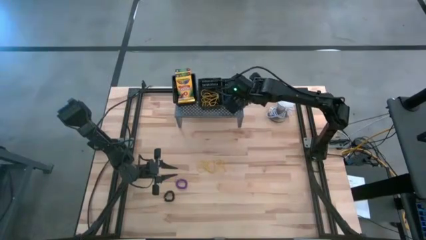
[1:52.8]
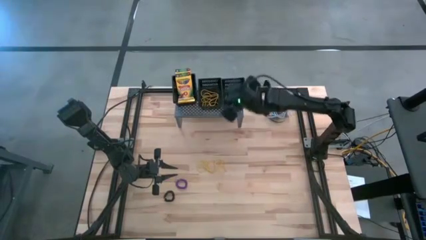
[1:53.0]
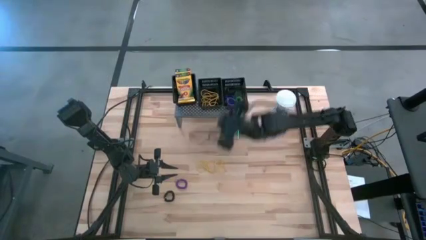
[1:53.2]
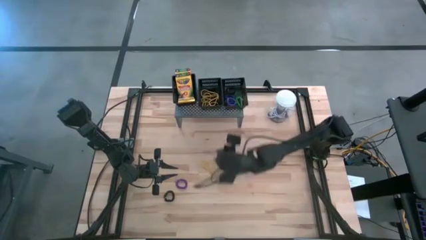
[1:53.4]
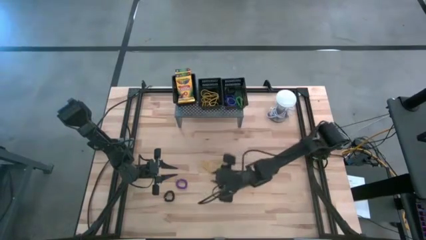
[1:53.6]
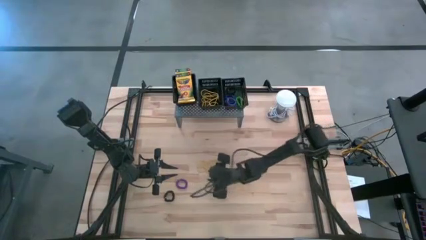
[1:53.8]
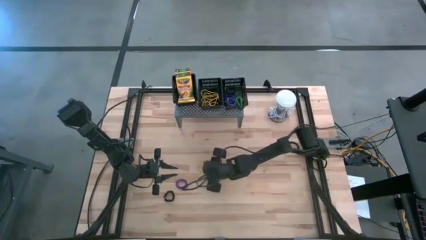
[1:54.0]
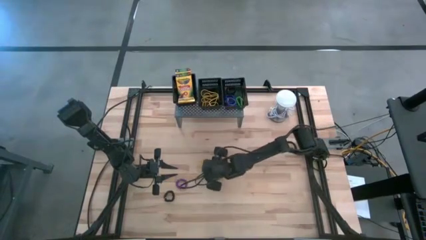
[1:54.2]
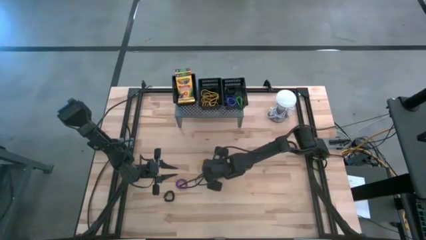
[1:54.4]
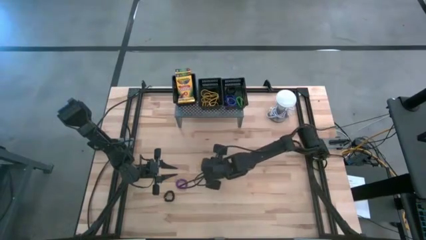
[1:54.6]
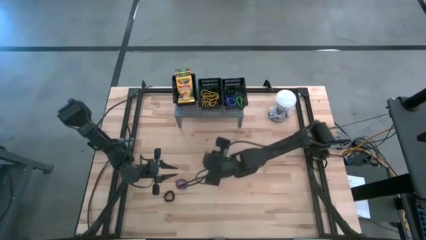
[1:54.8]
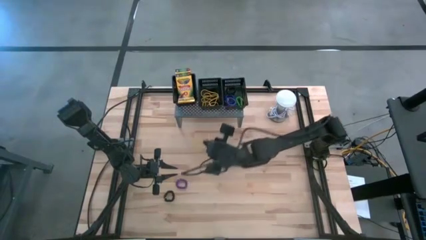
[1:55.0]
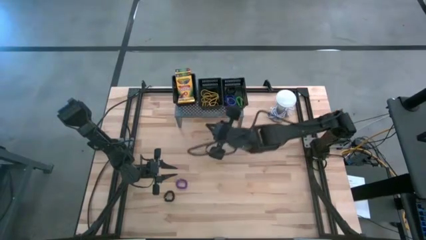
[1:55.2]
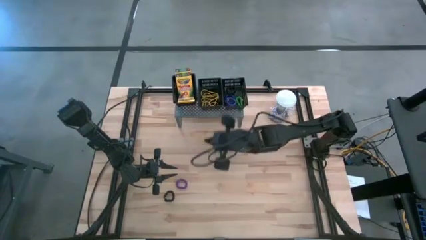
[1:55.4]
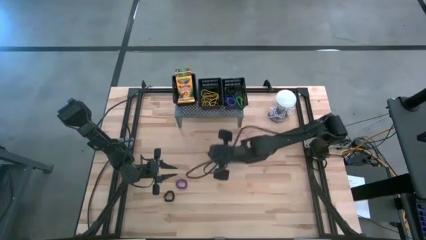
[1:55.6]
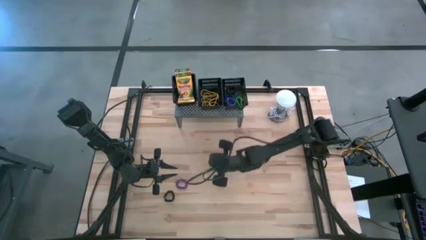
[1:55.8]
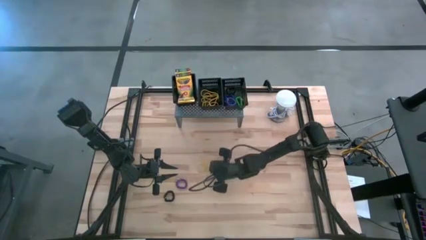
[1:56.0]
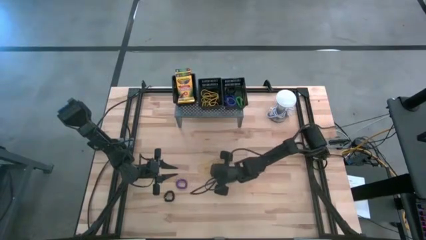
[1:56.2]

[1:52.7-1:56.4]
Task: Pick & Place Office Desk Supplies
Put the yellow rubber band in the middle black bin on the shelf

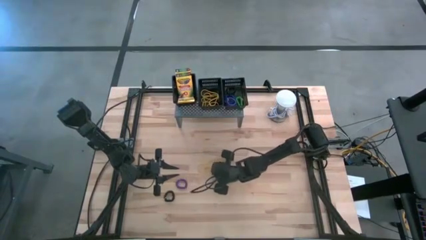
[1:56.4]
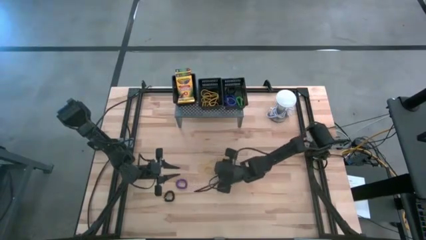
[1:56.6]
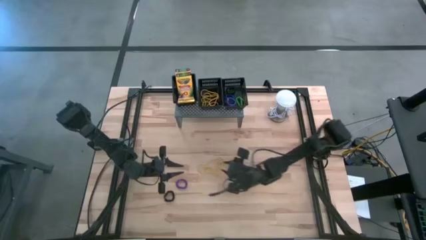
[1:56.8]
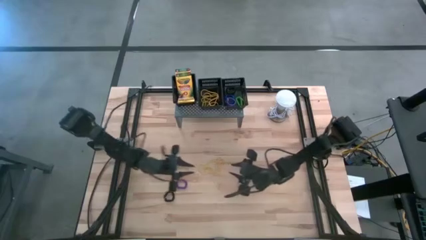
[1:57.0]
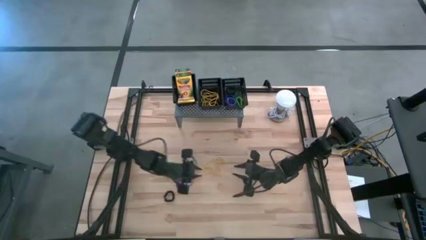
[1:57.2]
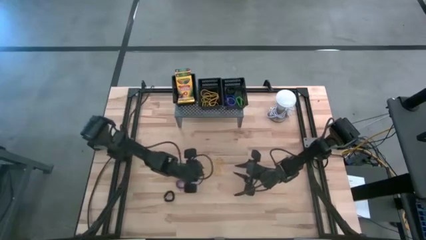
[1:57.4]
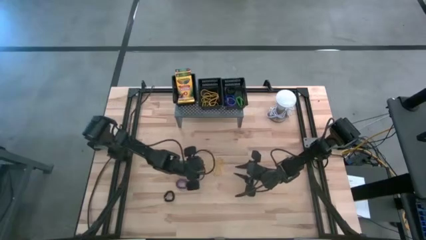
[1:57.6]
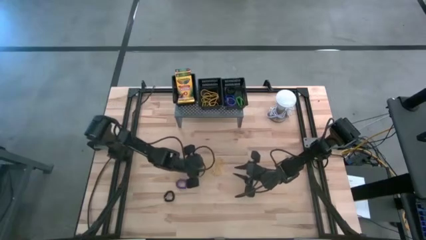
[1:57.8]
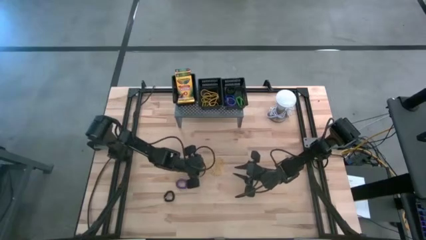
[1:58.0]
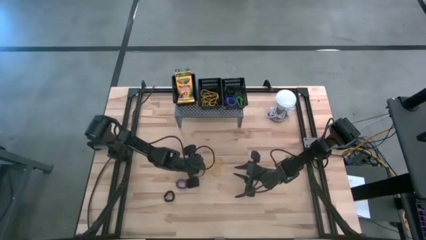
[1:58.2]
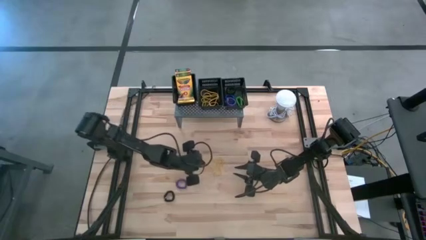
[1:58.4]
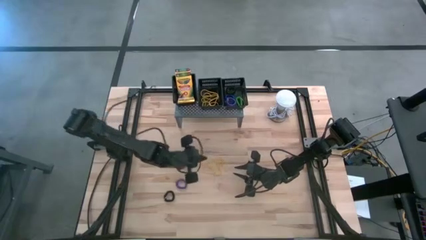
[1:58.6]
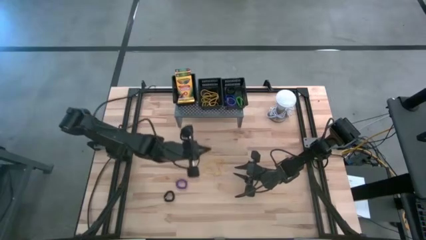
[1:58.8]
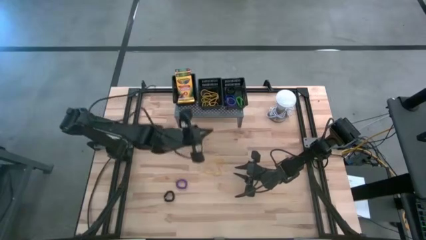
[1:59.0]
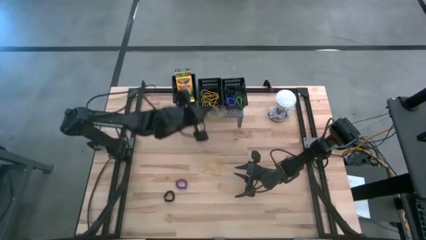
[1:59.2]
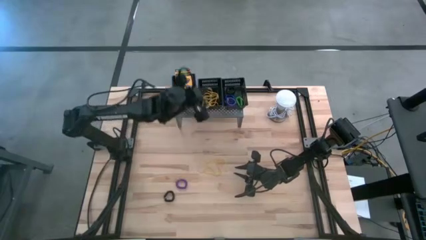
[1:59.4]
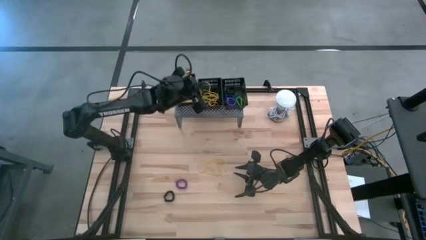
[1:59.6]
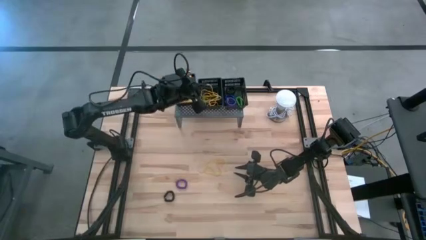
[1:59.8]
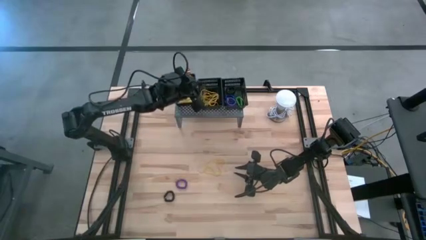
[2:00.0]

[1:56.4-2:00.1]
Put the yellow rubber band in the middle black bin on the shelf

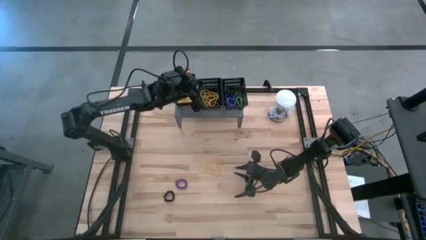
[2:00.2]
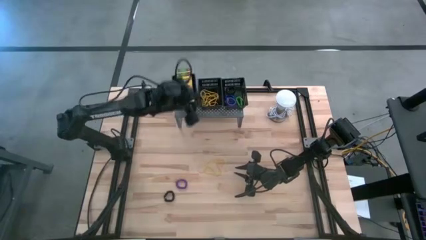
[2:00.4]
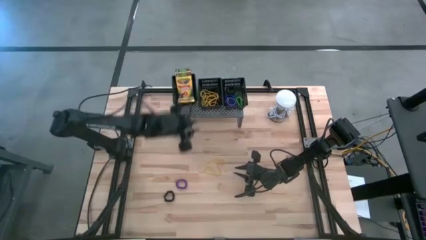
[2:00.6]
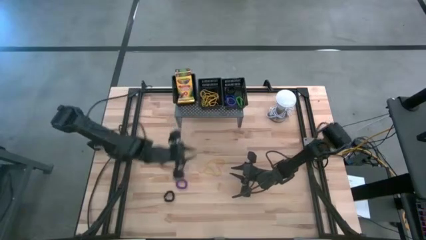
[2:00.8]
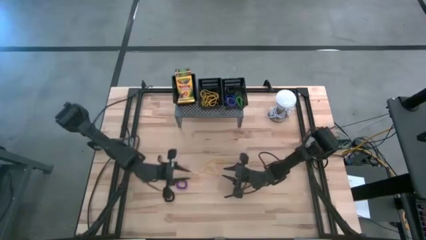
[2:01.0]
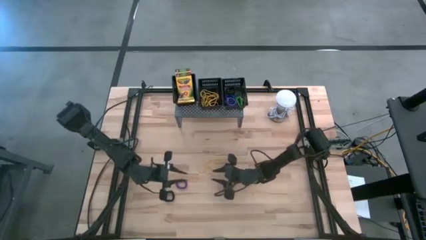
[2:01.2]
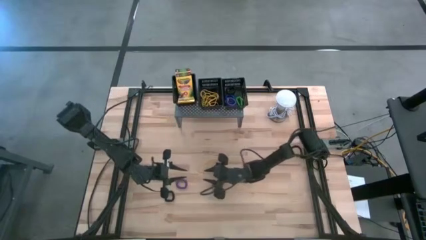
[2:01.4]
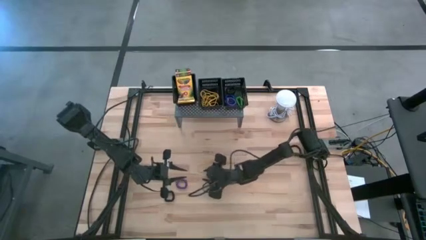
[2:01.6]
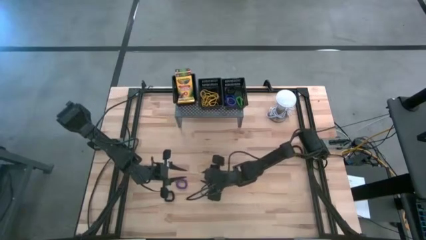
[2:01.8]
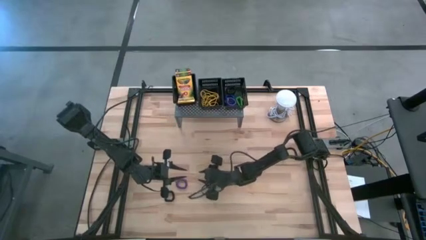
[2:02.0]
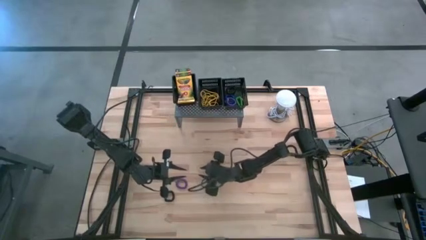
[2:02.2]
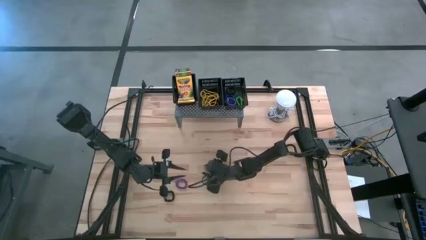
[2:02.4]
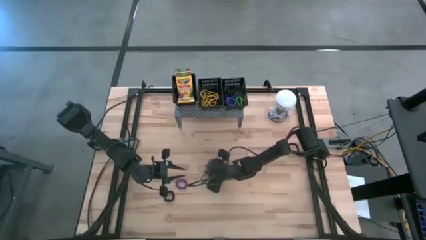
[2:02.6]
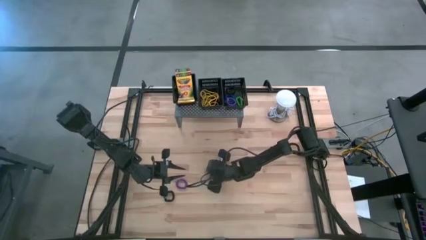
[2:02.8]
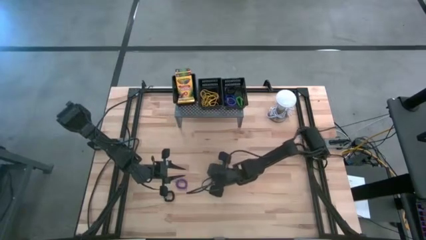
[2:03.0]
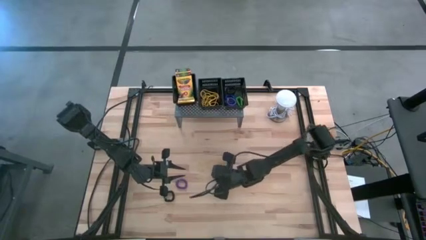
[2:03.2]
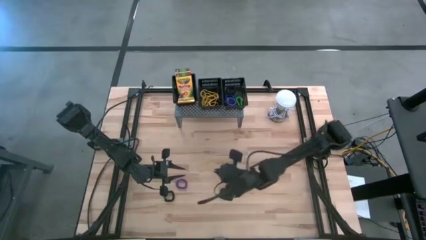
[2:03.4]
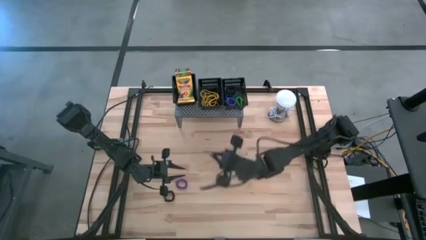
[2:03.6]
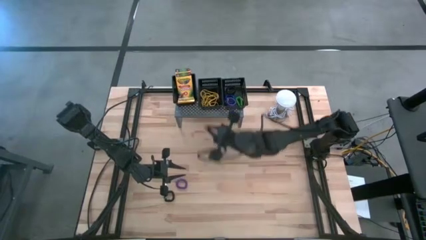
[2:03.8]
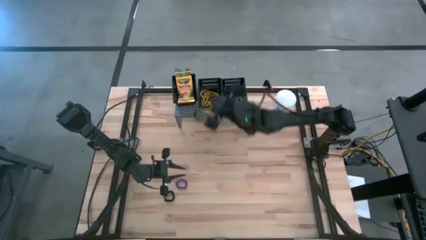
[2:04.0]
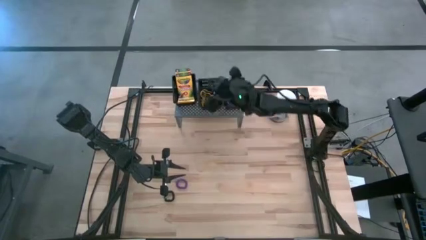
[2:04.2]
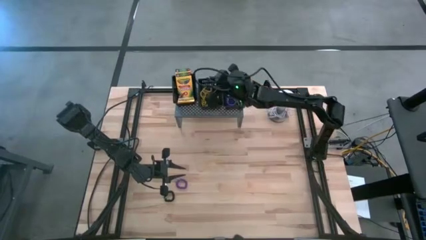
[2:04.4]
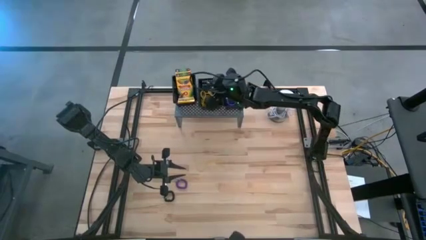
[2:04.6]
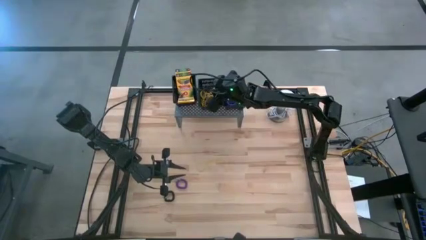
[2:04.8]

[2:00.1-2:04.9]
Put the yellow rubber band in the middle black bin on the shelf

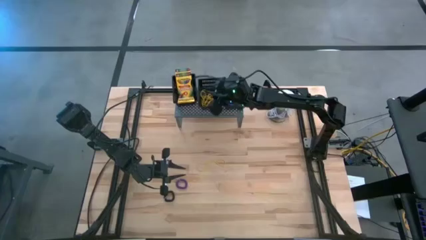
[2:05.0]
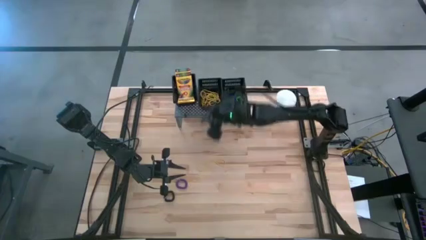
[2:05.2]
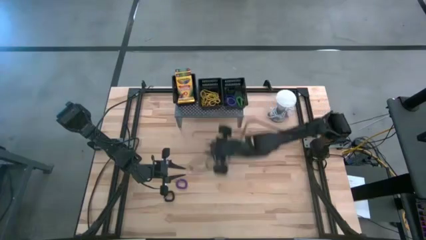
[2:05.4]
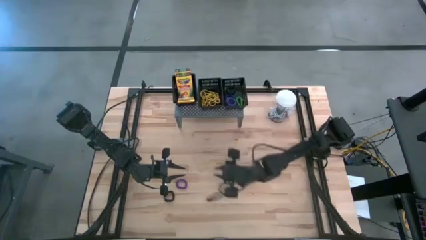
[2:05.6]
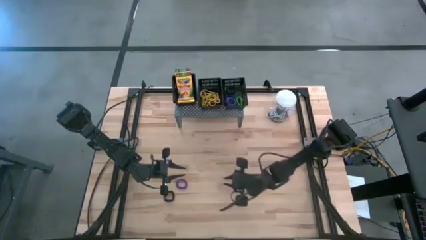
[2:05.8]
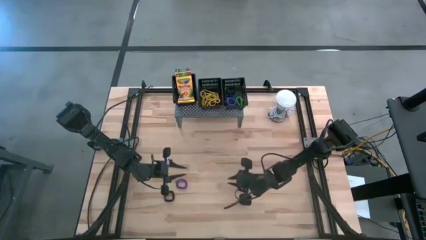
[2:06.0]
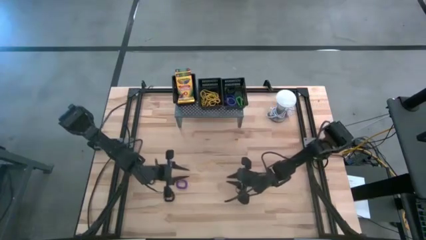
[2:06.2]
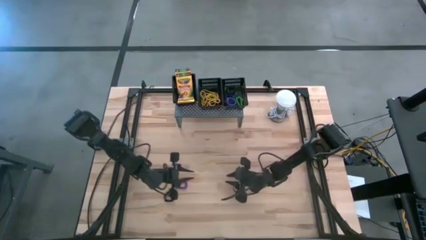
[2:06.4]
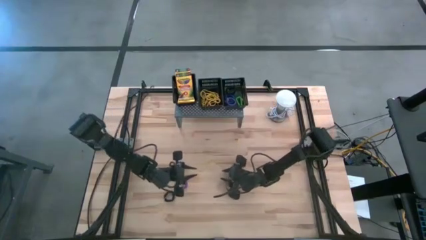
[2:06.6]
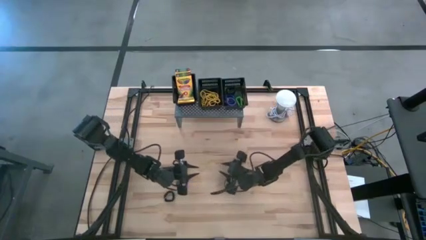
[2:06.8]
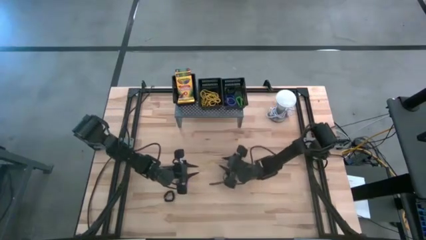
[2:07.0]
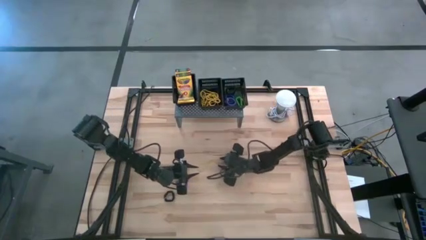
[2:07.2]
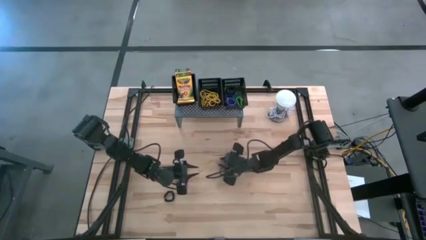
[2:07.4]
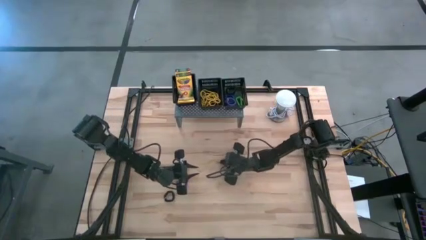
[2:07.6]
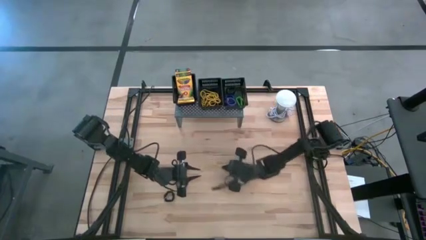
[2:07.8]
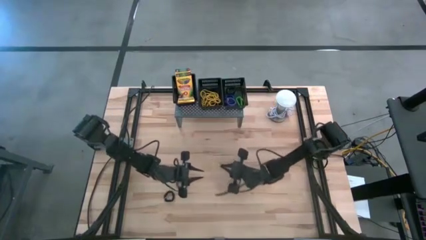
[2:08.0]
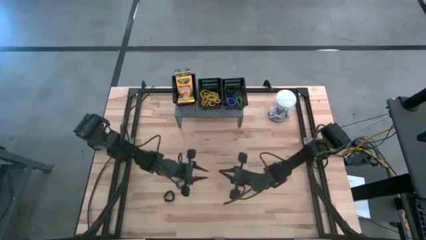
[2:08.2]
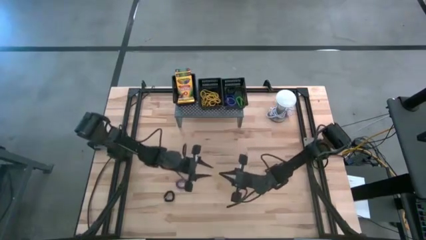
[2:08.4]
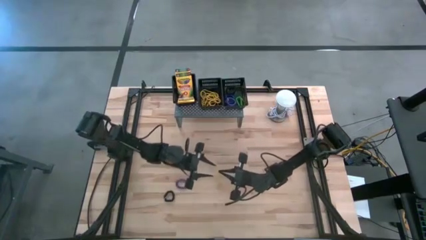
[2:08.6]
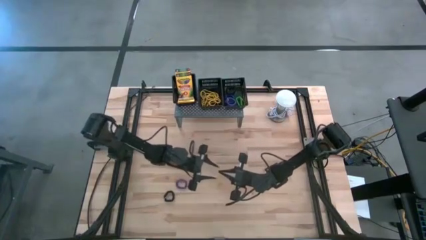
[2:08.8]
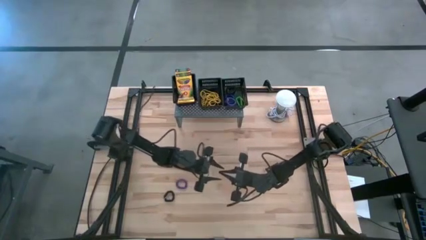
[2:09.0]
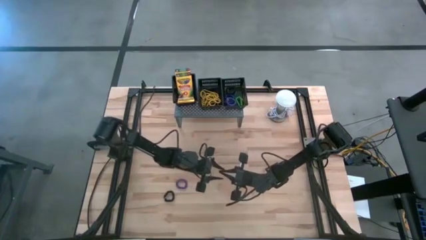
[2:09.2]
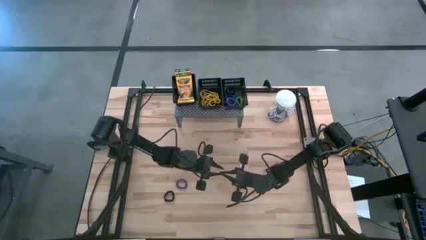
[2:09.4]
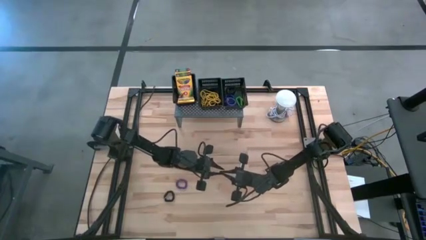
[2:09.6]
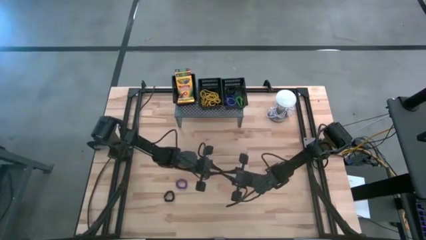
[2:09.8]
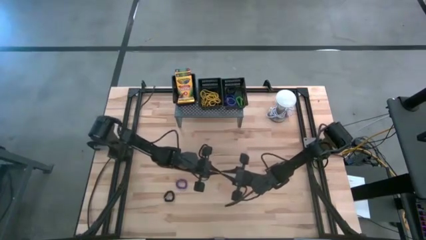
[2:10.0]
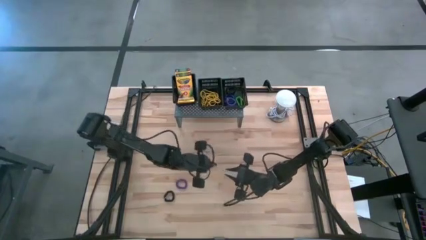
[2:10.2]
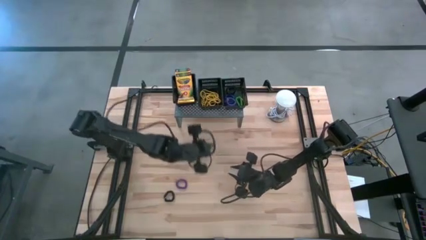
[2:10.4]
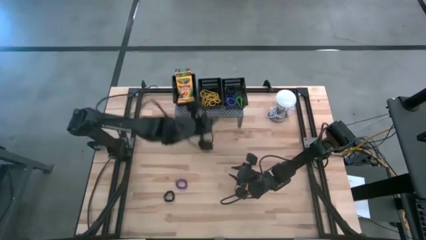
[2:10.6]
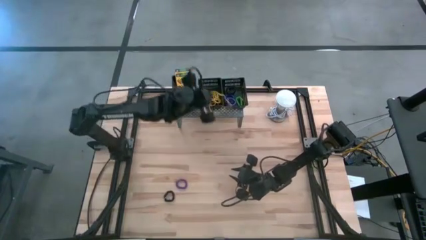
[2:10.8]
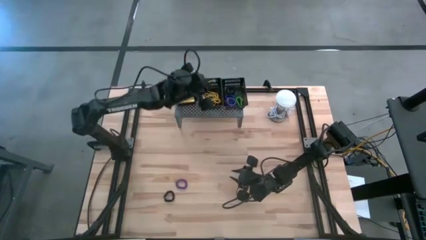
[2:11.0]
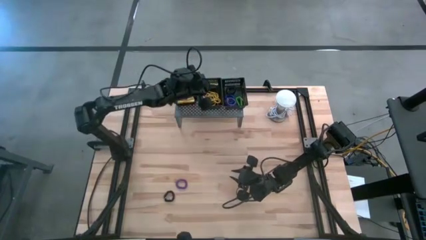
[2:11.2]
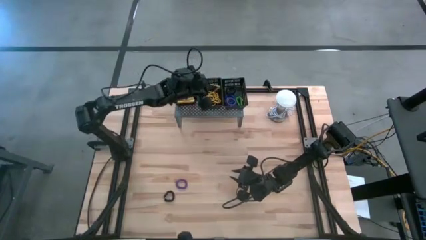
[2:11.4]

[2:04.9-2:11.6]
Put the yellow rubber band in the middle black bin on the shelf
